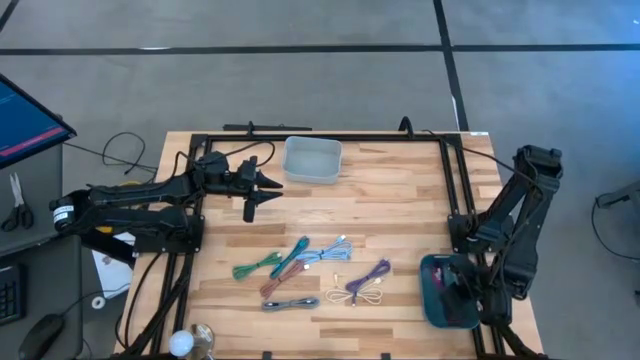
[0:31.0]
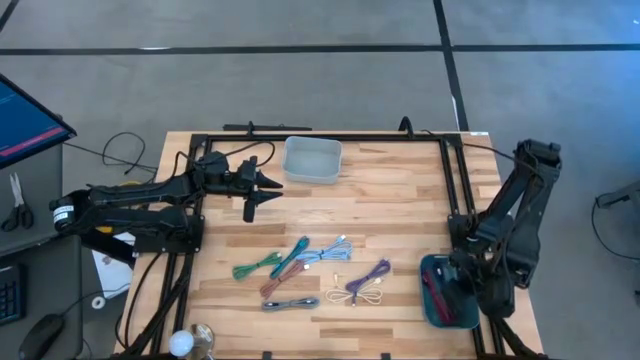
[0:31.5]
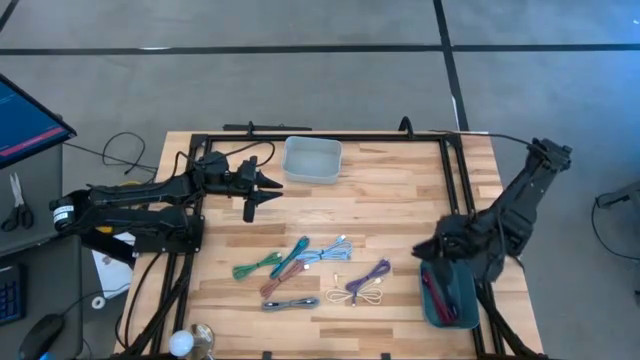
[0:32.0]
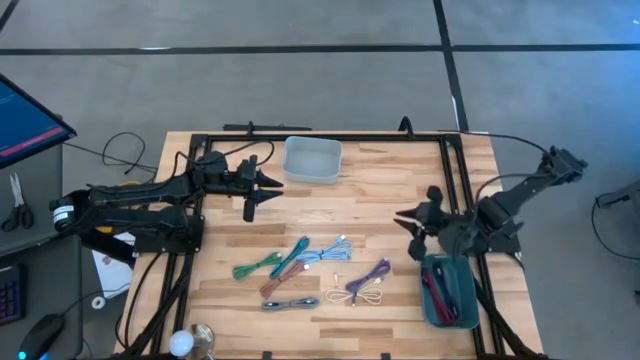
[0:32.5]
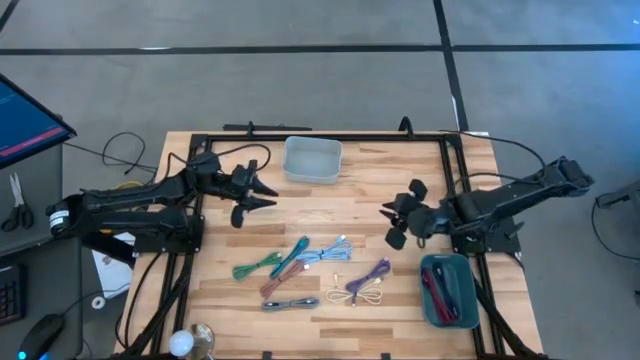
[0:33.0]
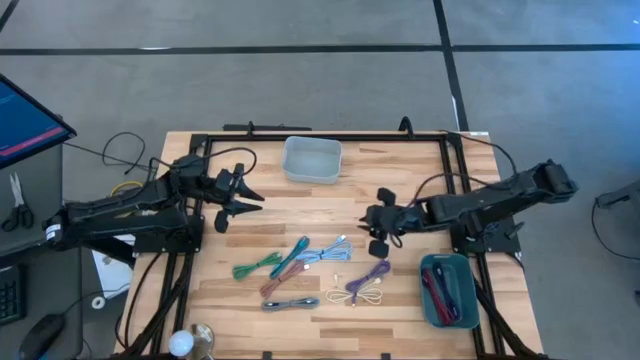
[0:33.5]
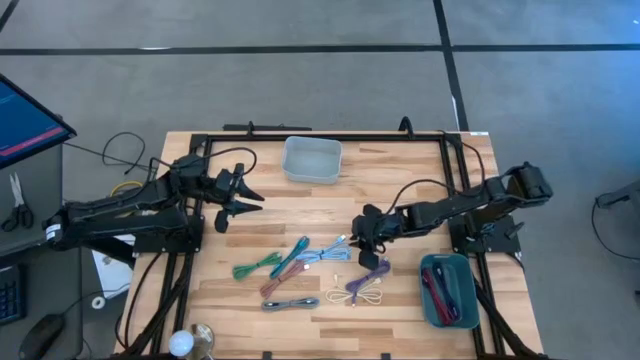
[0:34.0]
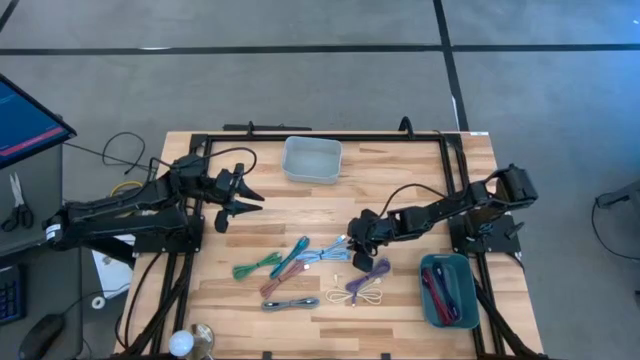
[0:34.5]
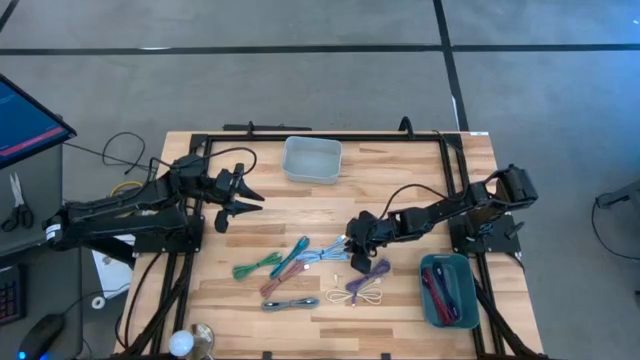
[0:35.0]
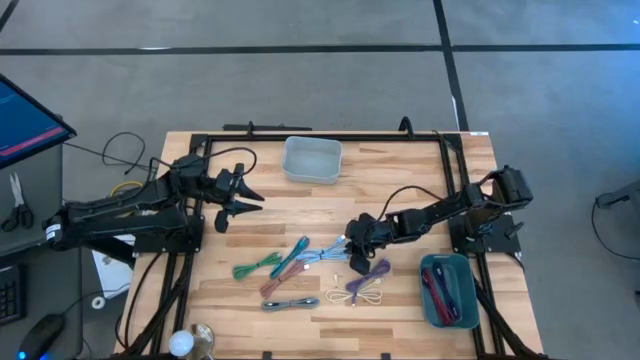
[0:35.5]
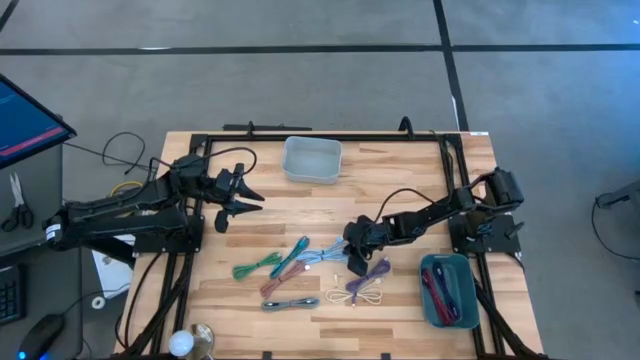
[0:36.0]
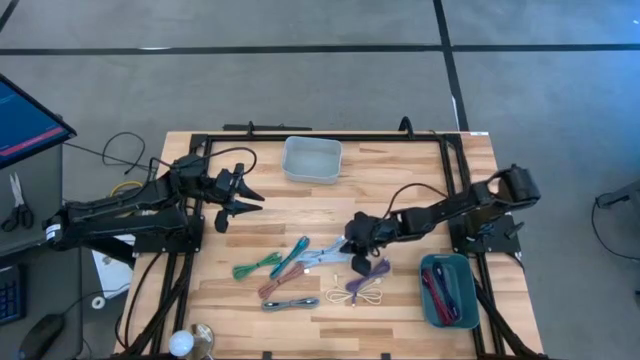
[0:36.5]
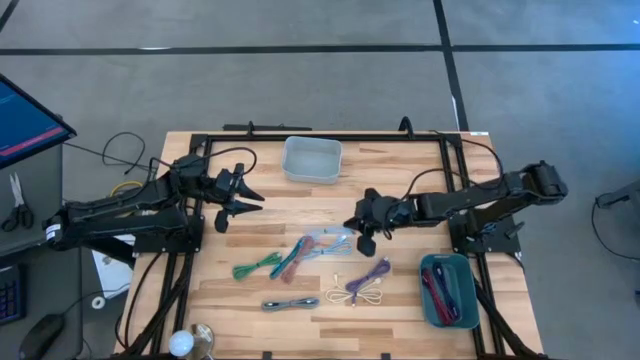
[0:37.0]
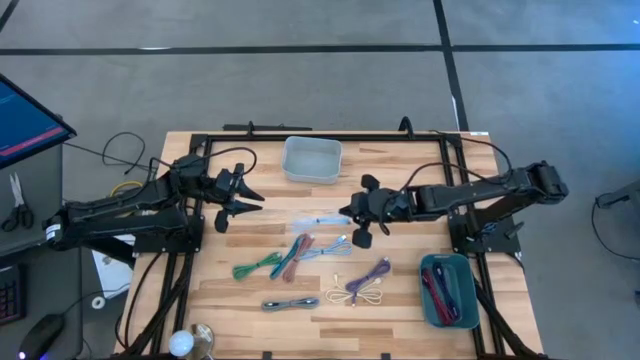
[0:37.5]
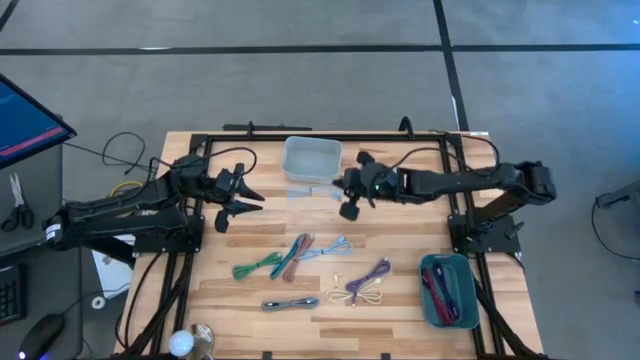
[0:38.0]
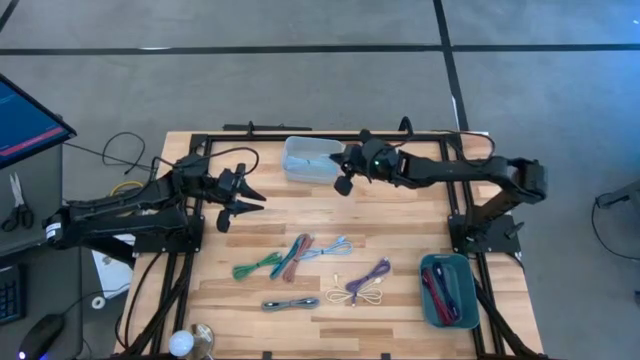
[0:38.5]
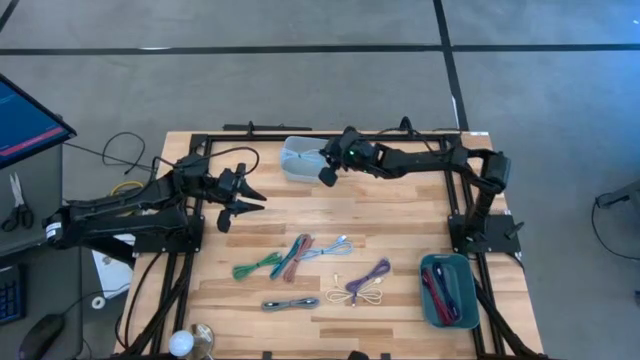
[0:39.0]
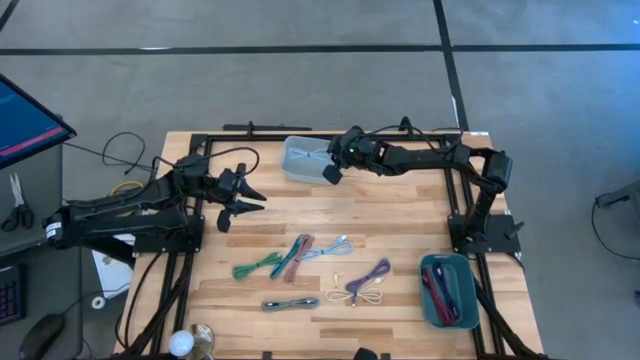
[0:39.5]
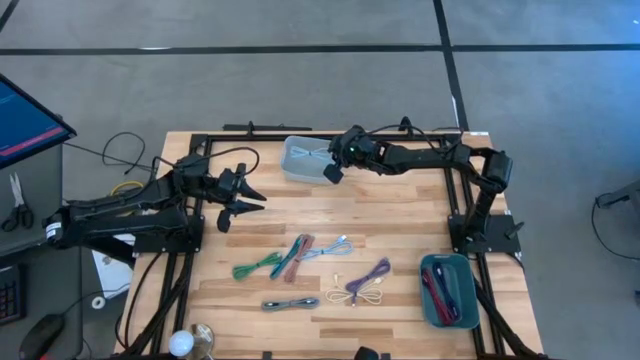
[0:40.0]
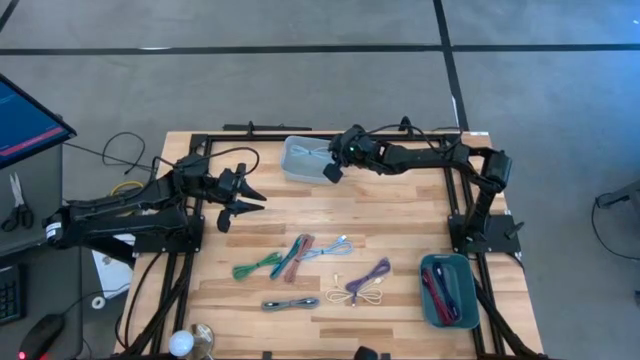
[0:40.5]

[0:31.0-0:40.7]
Task: Pick & Place USB Port
Put the bottom light blue charger cable into the gray bin

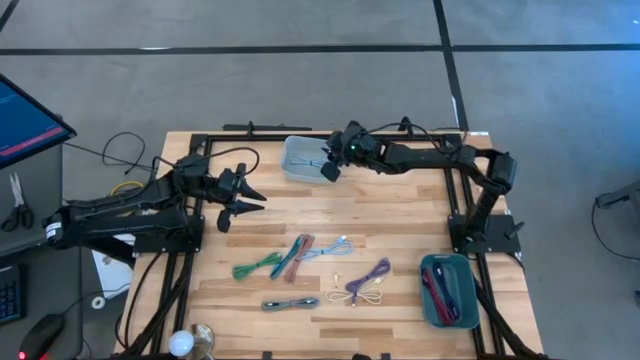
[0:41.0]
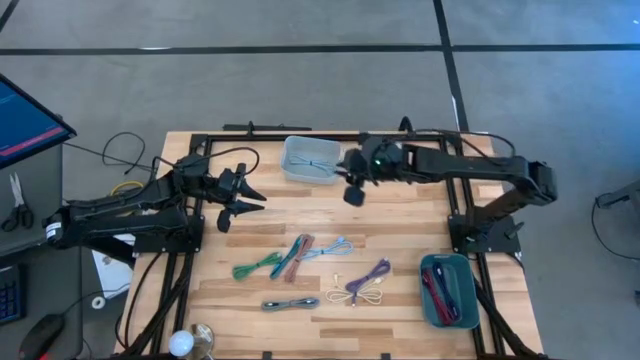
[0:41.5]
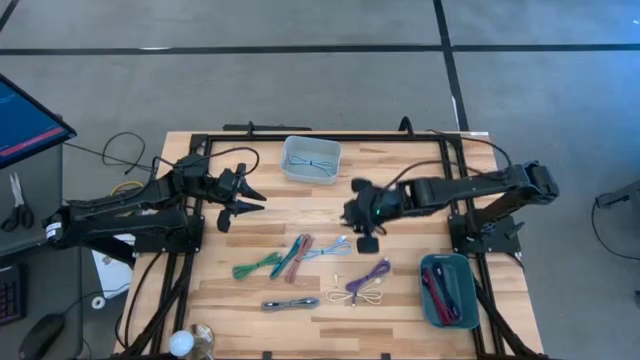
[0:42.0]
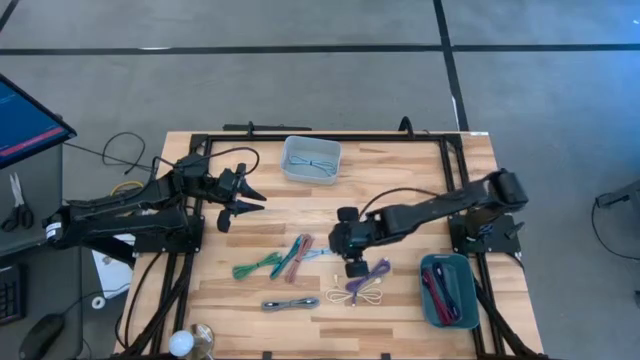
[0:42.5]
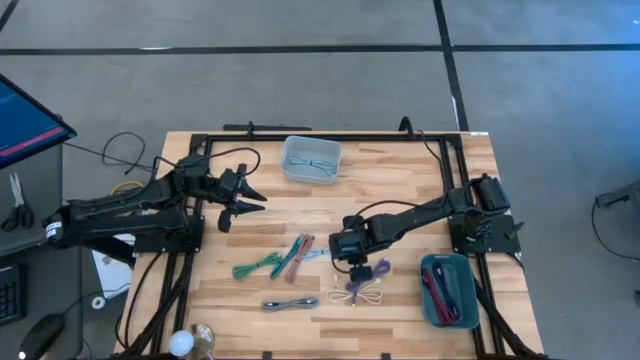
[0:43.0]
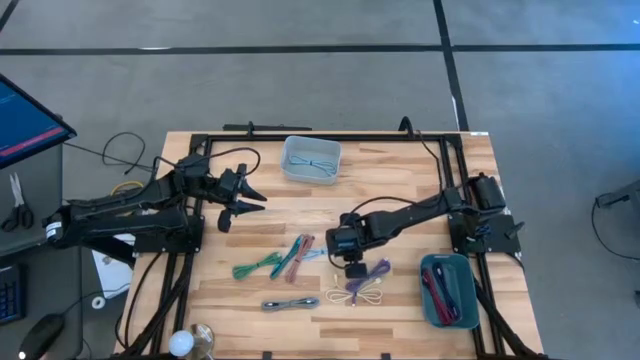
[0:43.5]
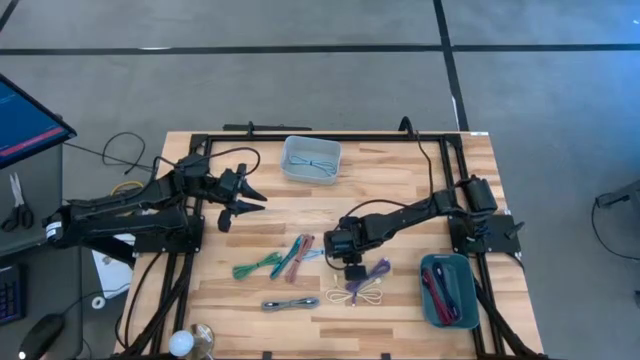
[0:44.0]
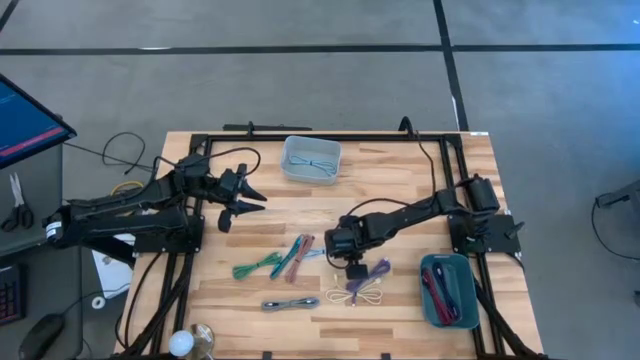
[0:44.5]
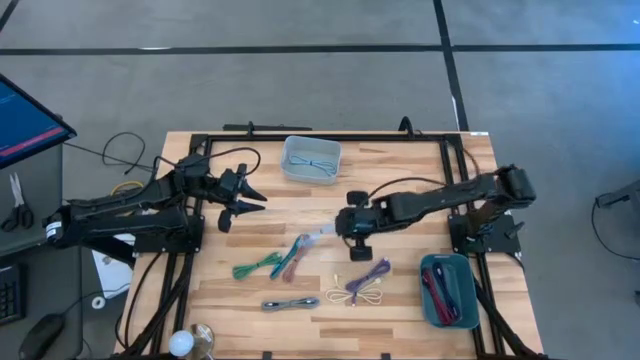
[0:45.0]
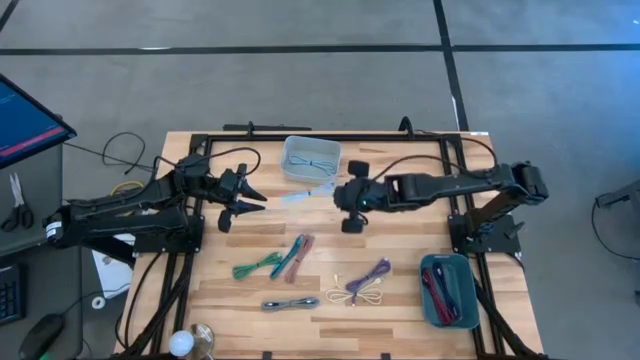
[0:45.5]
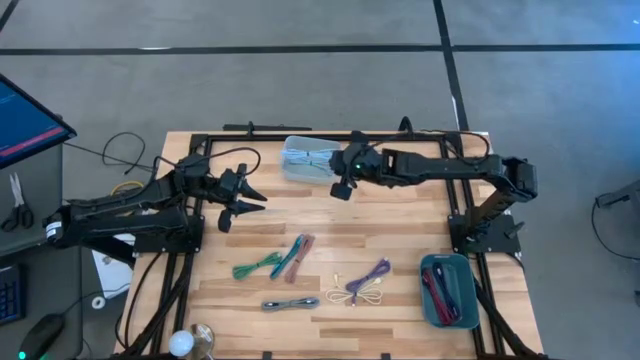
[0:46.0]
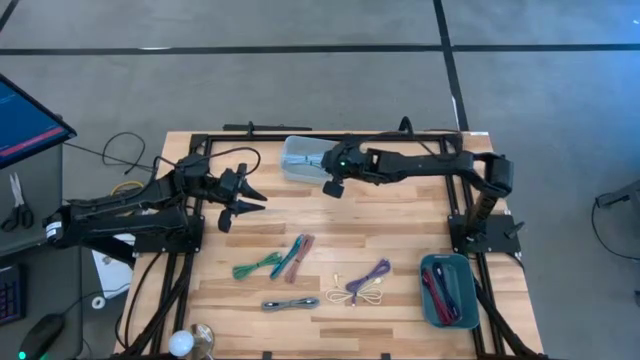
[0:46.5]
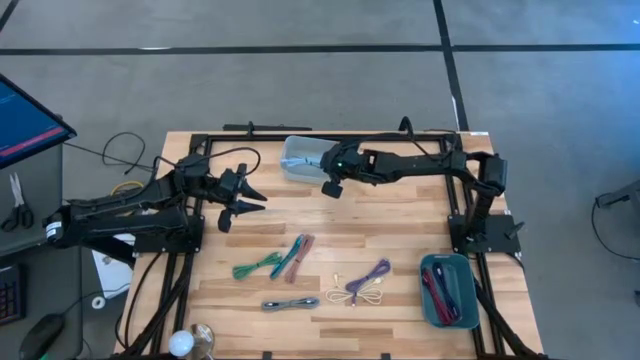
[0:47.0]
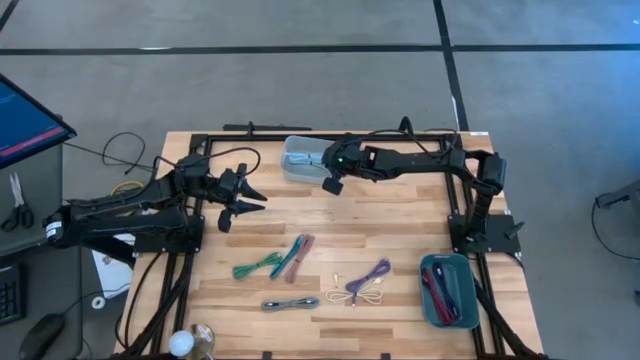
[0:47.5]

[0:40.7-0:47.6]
Put the light blue charger cable into the gray bin

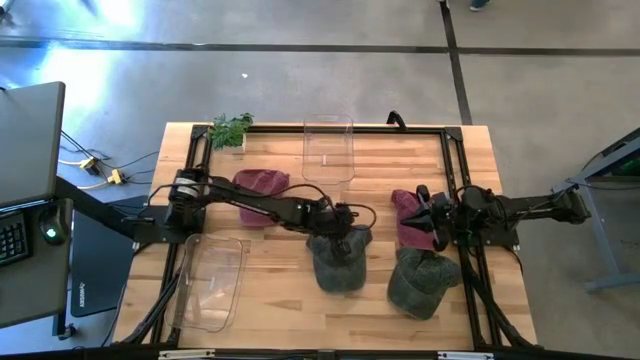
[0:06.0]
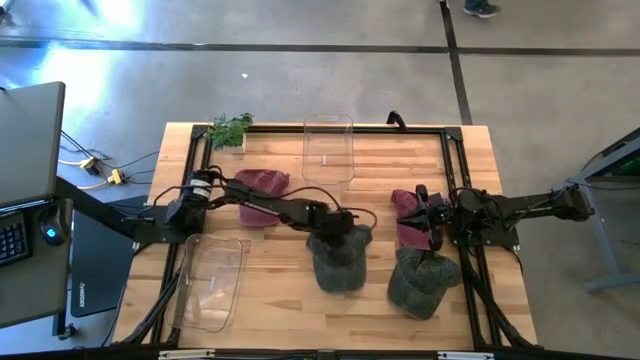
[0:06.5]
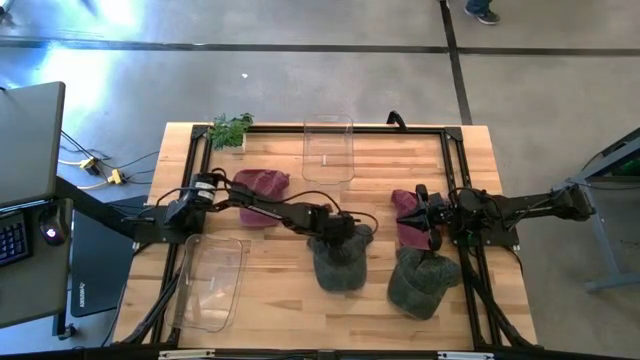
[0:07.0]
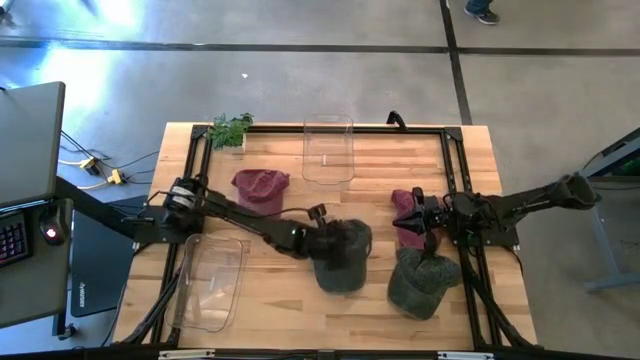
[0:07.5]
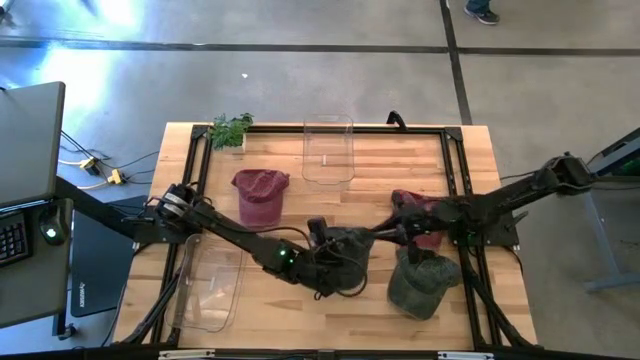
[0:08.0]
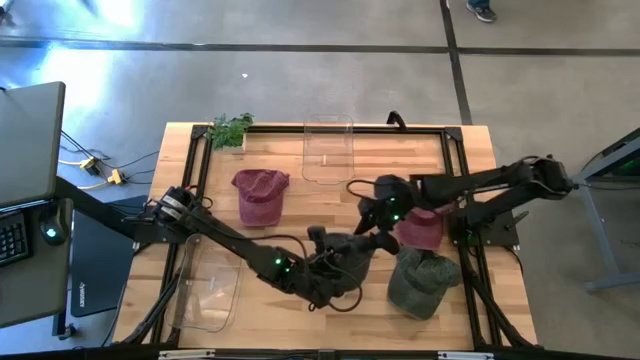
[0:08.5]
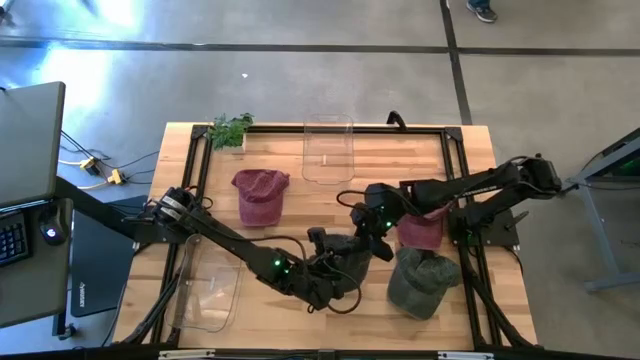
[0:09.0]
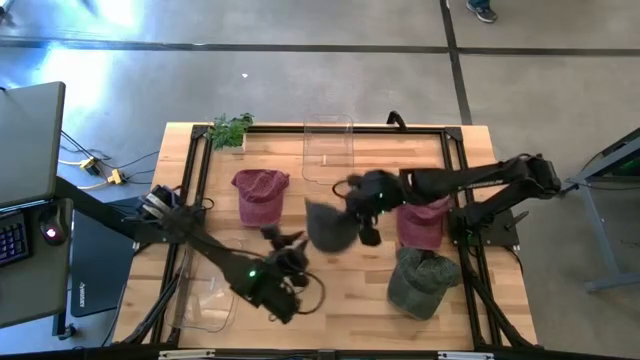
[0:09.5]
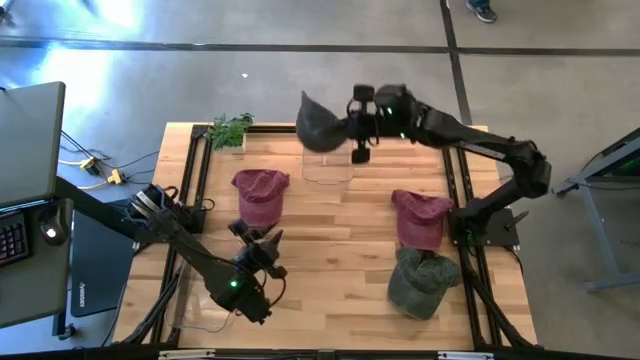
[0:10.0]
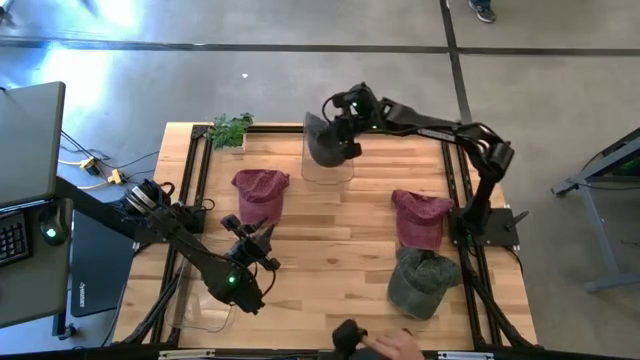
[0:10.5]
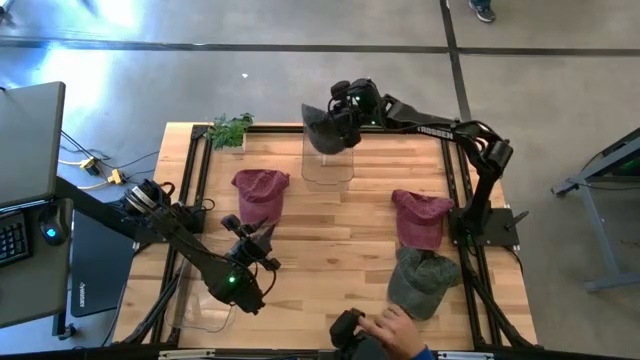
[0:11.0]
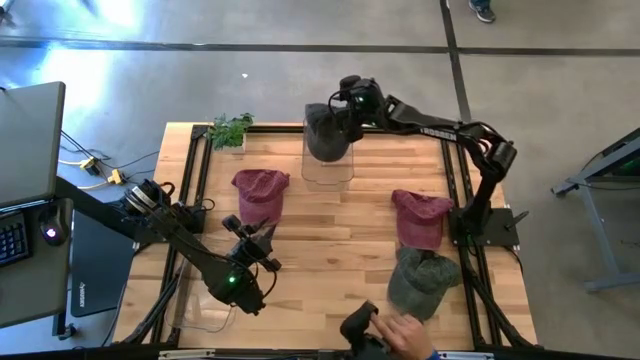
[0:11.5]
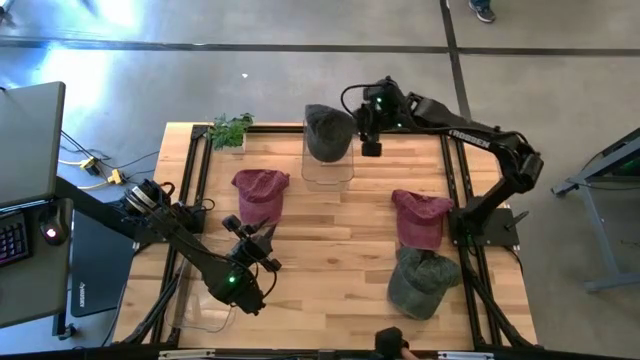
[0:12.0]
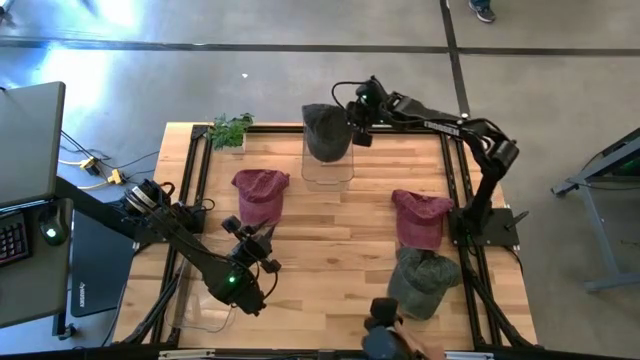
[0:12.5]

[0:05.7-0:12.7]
Task: Pick & Place hat
Put the left black cap into the top transparent bin
